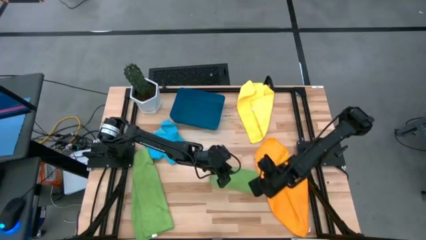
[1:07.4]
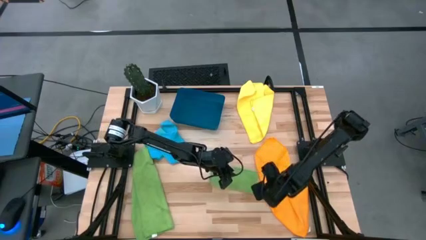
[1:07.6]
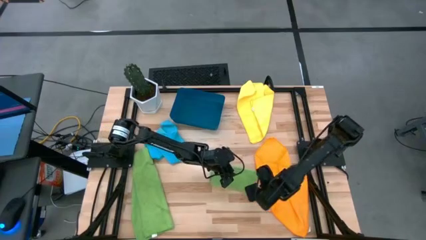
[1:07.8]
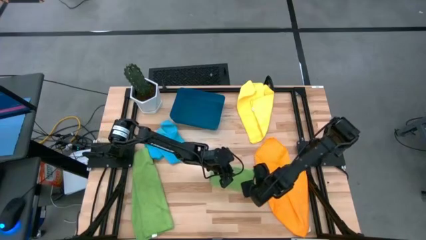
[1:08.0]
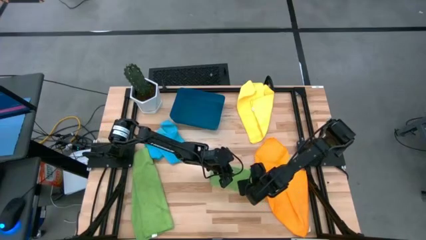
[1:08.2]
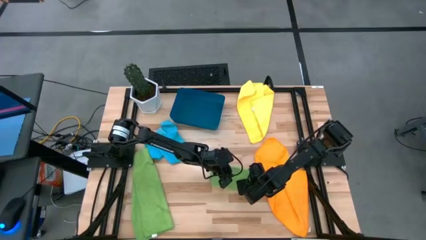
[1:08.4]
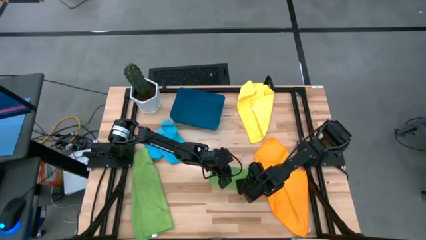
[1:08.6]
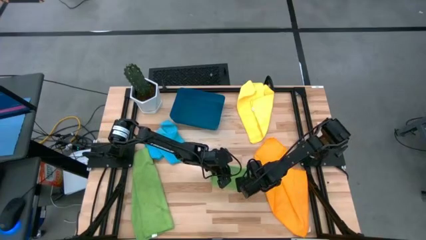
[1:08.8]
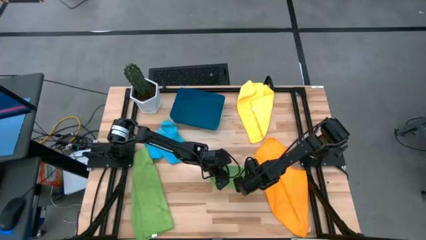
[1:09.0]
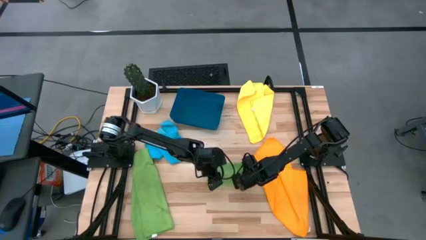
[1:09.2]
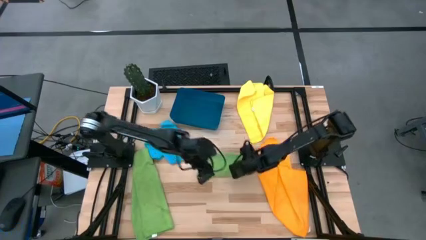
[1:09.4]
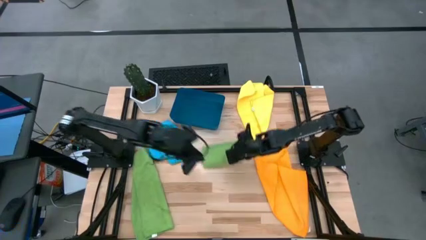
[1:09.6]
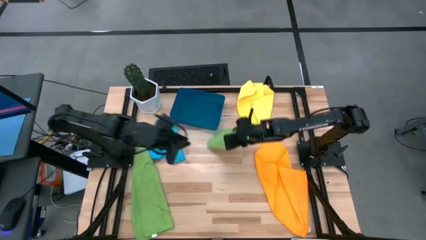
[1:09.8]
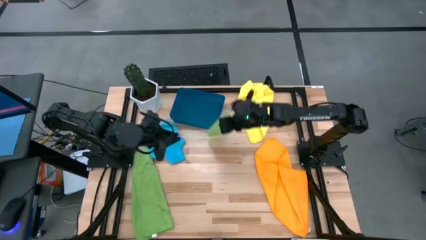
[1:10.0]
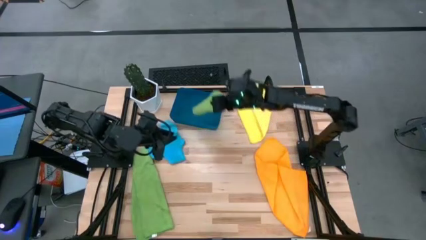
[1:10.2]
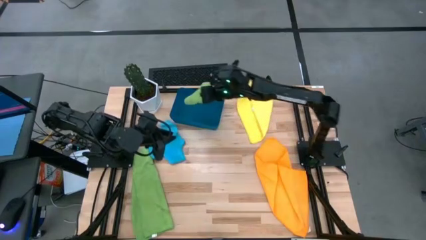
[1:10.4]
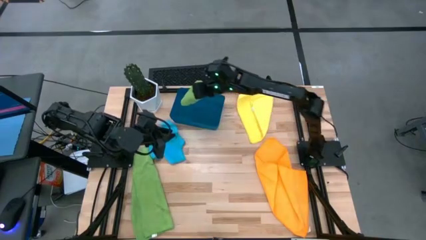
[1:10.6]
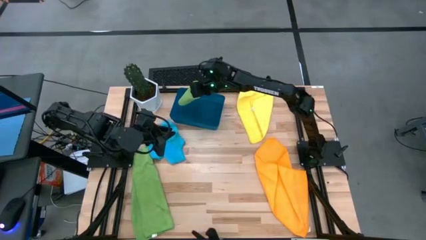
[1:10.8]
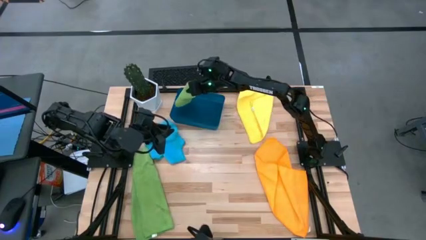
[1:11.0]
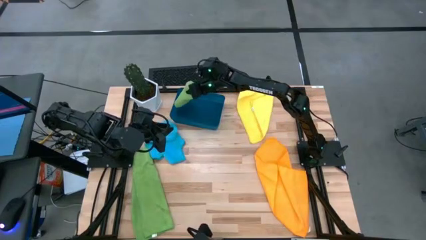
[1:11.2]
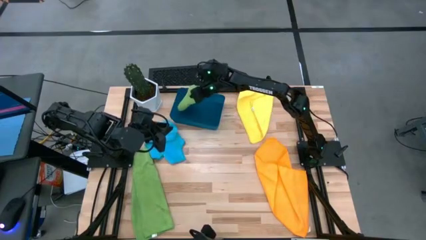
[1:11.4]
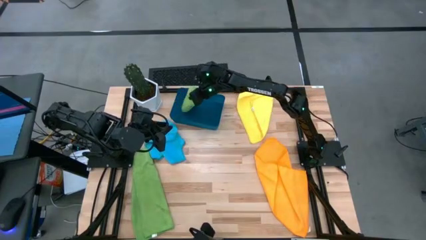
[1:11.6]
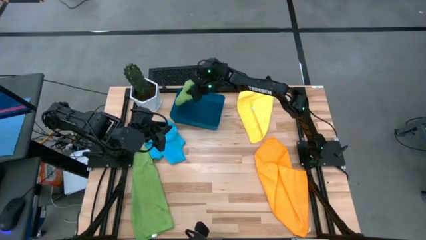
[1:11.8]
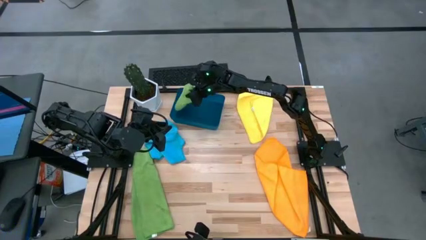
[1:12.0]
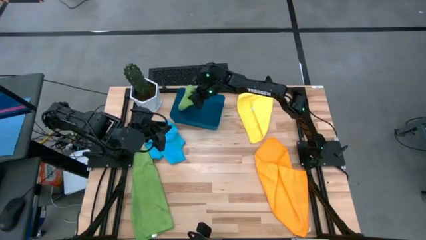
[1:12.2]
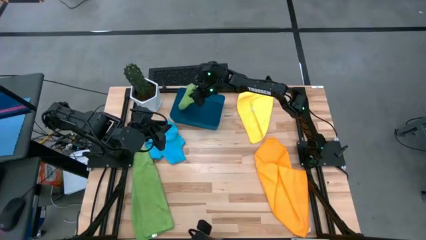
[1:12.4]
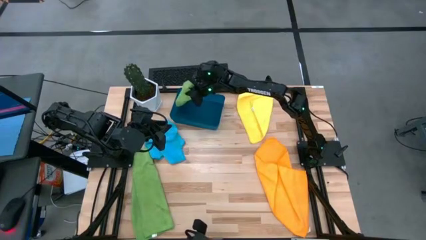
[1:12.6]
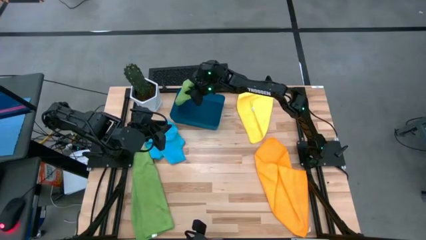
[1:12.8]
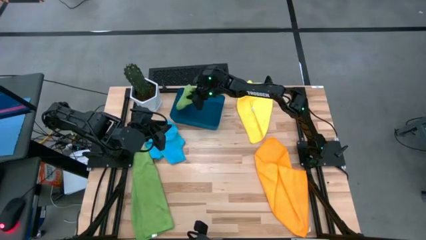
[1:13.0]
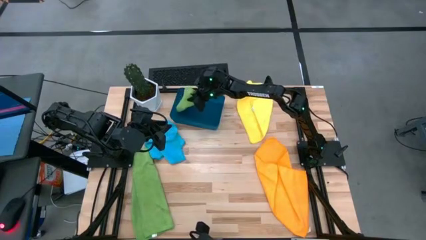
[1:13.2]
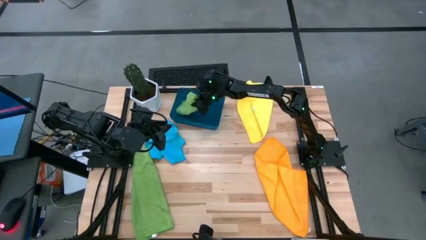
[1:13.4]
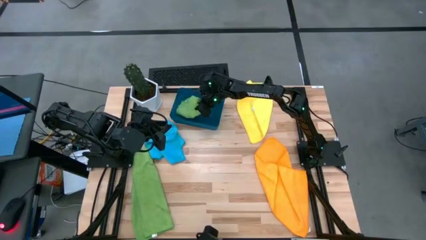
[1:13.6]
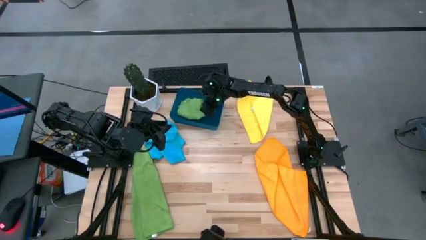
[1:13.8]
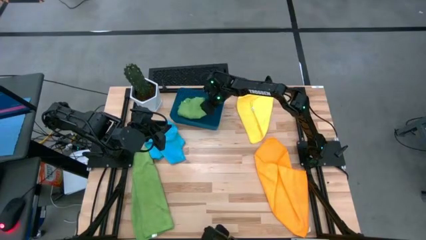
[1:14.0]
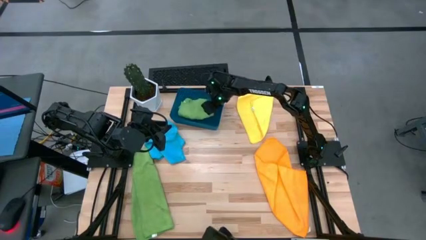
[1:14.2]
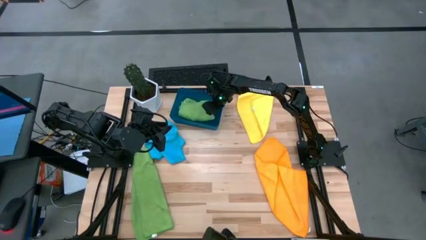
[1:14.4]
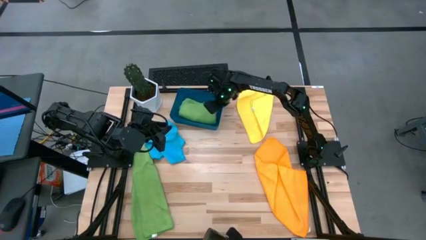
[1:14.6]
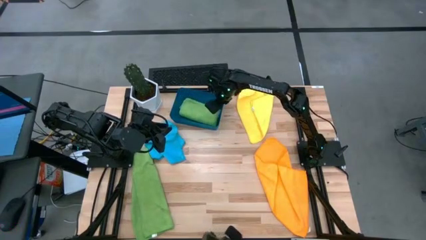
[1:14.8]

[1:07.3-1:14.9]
Task: Fold microfiber towels
Put the right green towel into the blue bin

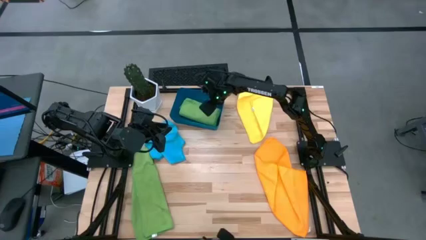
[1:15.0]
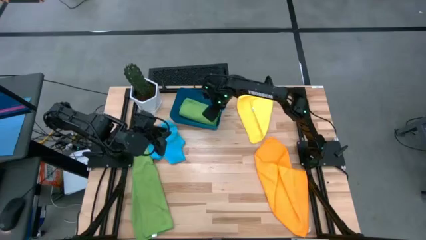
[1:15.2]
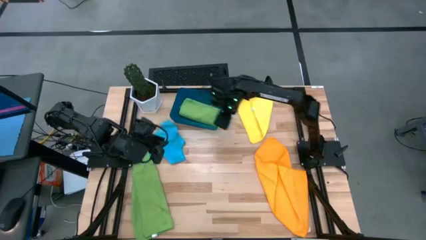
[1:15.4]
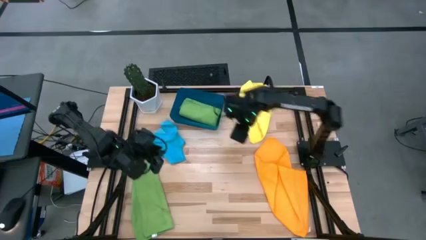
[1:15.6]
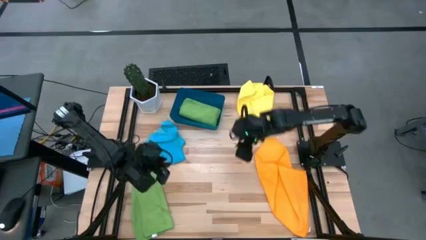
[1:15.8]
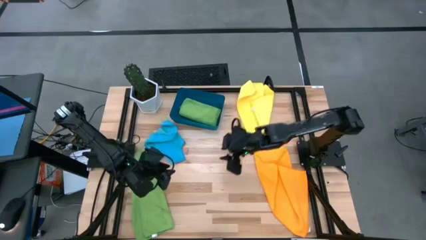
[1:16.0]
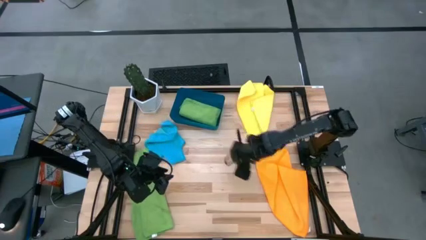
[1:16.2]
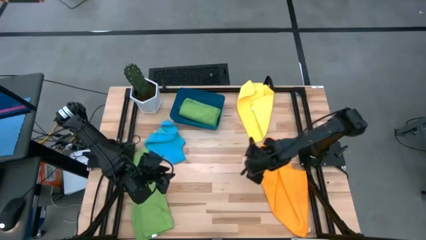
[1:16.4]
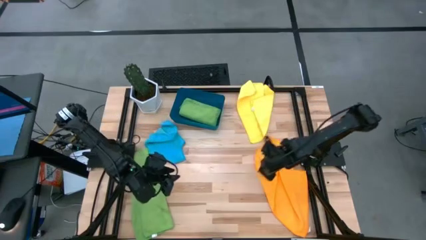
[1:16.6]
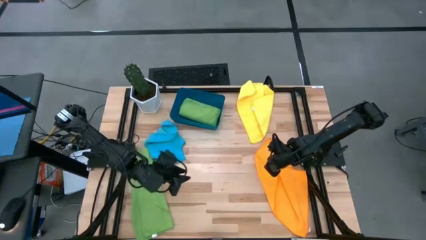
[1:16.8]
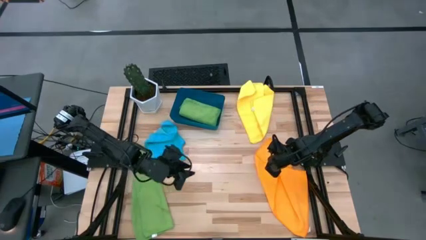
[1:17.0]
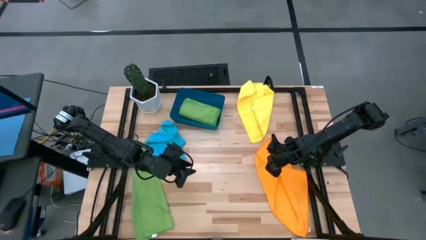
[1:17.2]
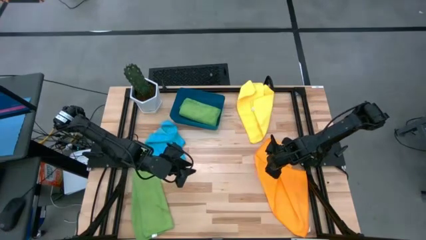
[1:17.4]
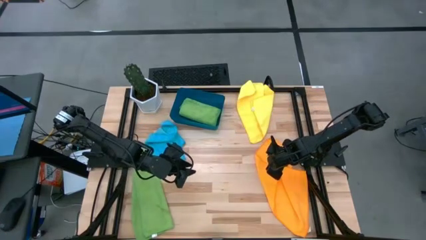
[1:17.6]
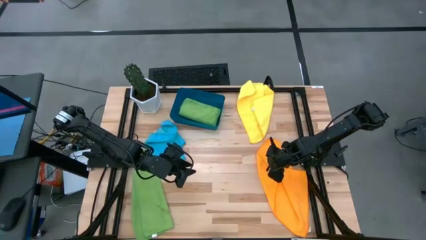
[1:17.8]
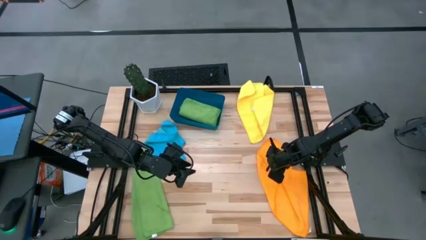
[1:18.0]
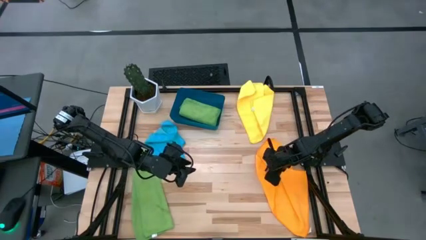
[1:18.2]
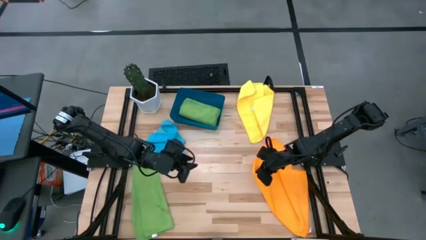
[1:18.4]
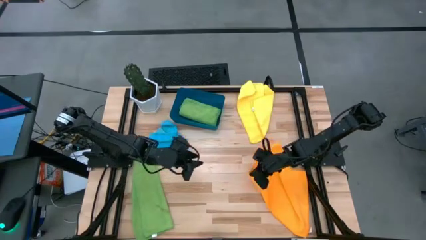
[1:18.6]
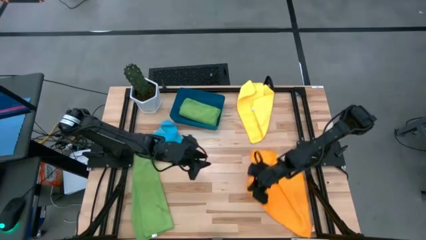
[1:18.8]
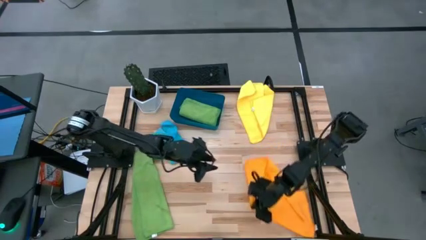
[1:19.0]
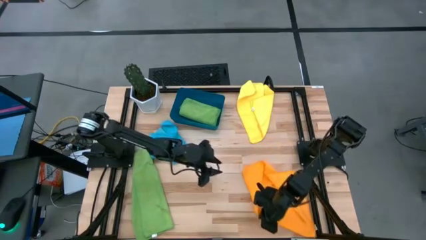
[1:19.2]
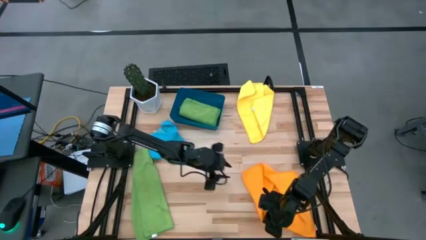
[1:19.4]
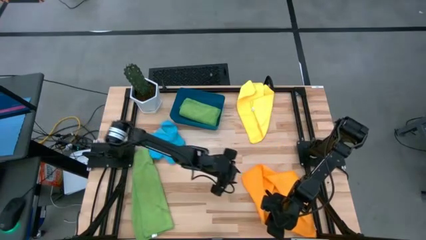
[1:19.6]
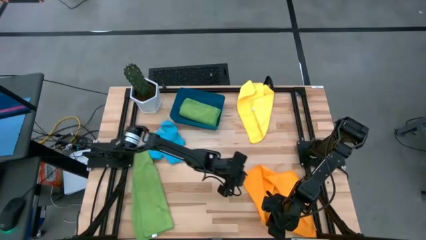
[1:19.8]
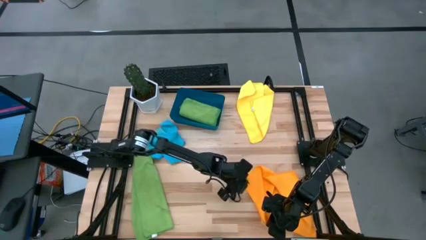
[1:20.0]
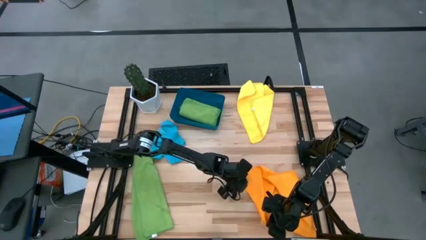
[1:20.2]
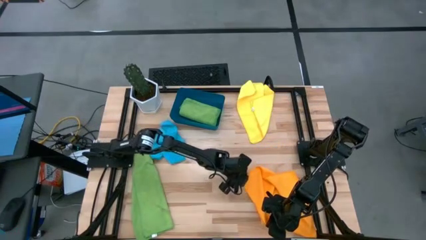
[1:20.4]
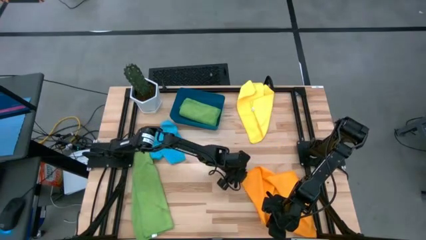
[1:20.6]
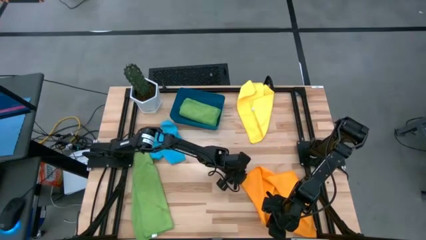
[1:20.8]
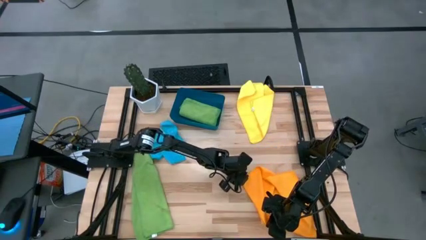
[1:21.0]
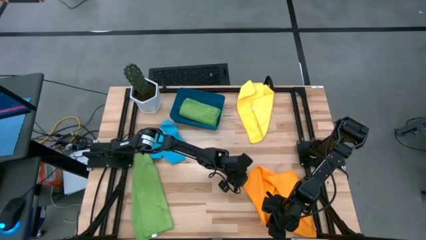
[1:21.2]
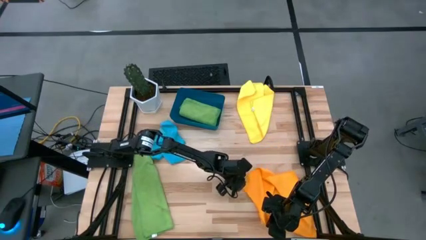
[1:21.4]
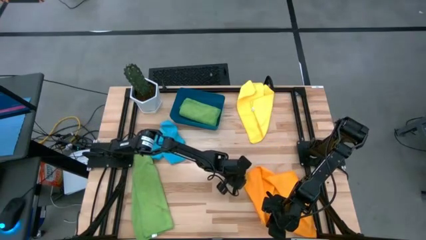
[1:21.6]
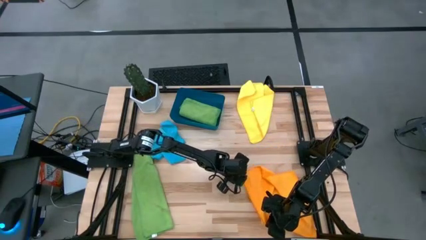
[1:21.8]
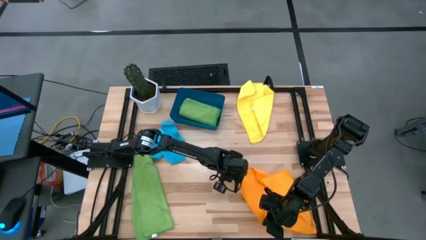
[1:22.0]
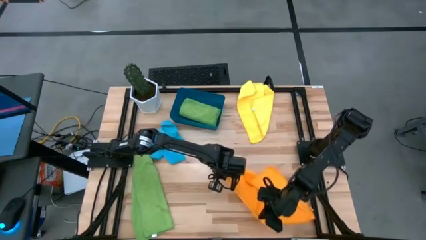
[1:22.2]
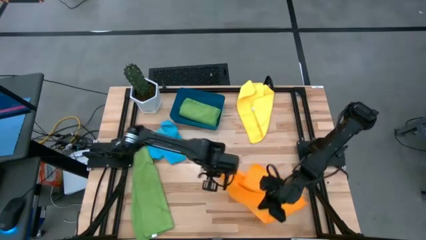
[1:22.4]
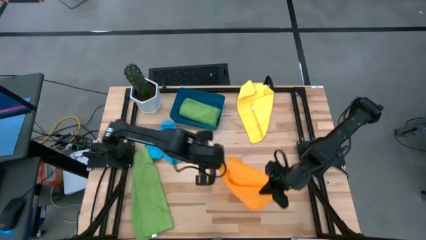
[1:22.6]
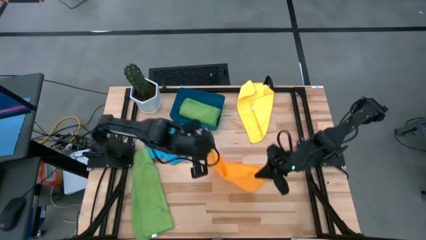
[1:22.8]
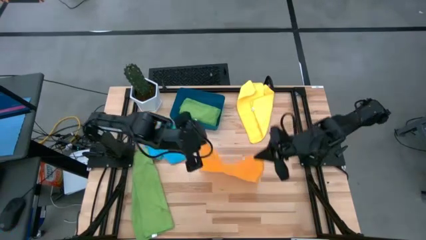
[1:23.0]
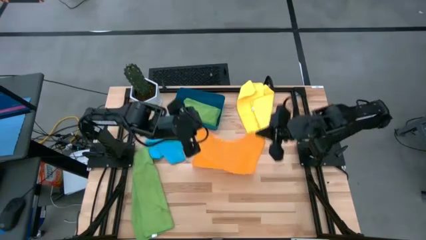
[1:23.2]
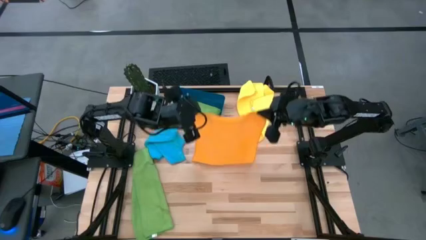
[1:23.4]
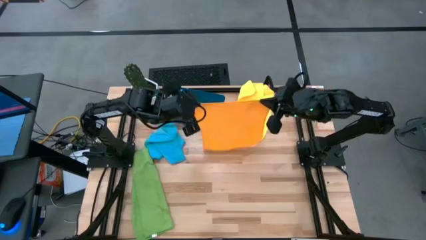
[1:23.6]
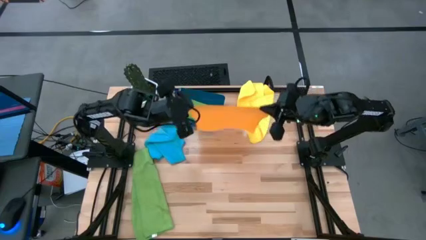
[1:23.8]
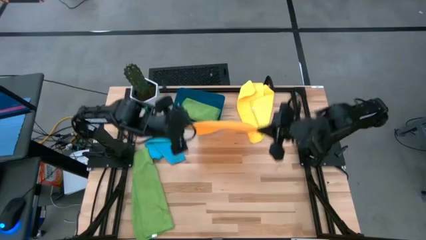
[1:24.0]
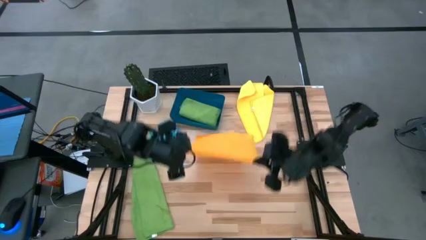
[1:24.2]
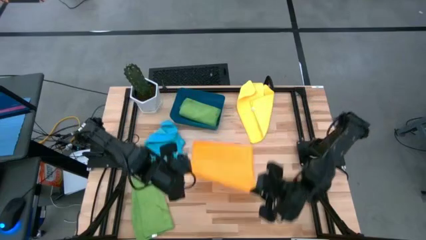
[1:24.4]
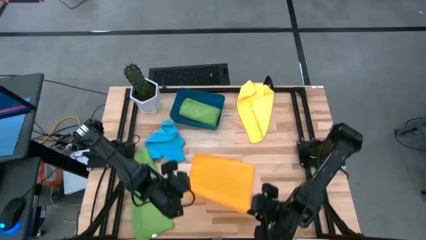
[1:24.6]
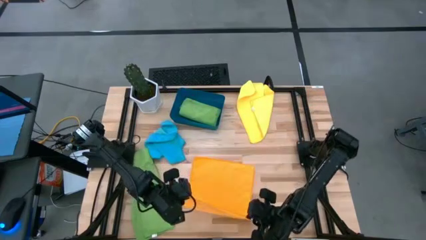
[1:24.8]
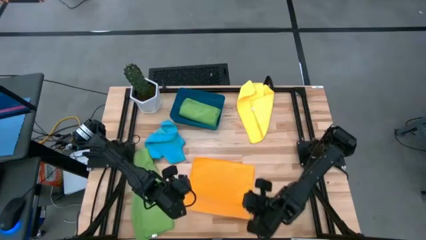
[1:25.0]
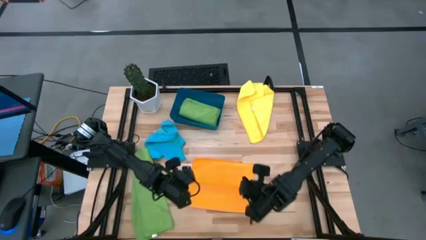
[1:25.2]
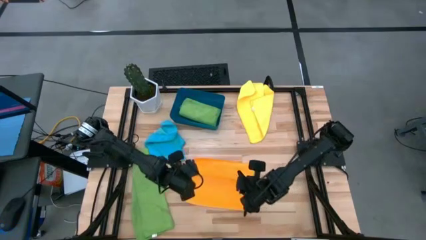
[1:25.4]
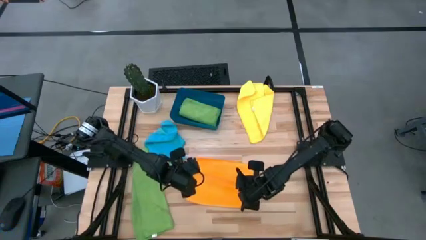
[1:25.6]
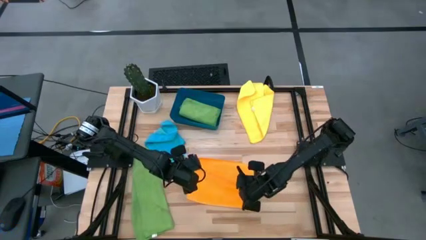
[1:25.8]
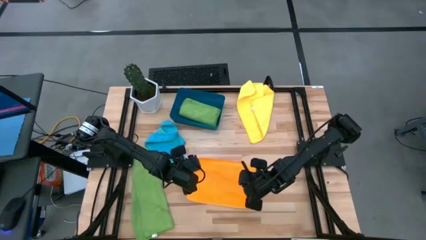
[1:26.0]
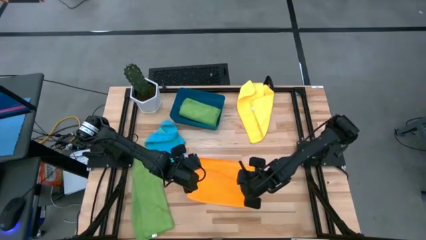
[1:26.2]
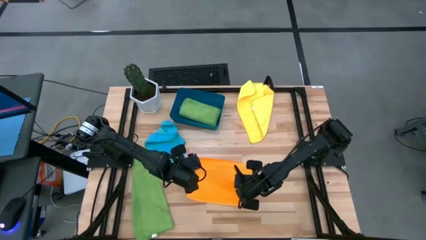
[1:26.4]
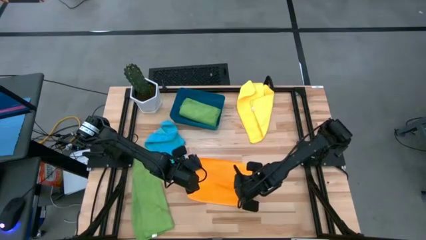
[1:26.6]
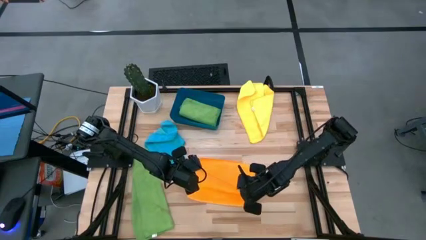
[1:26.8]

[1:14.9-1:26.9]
Fold the orange towel
